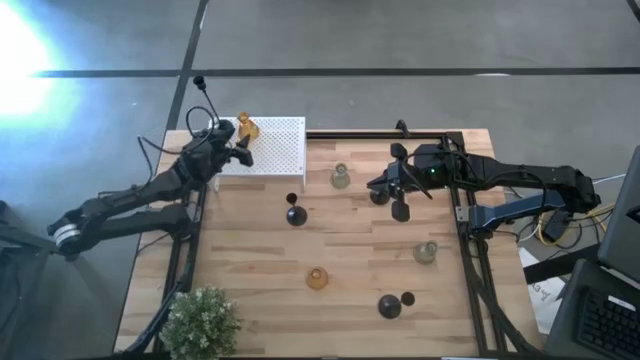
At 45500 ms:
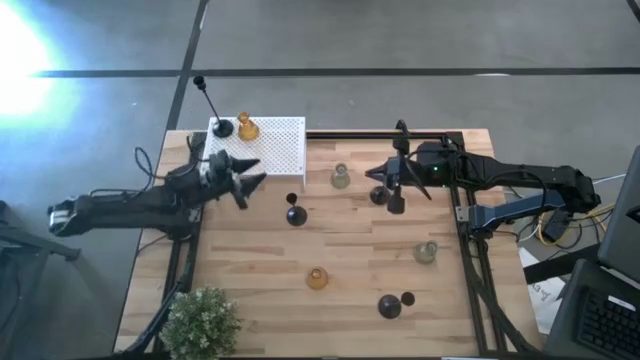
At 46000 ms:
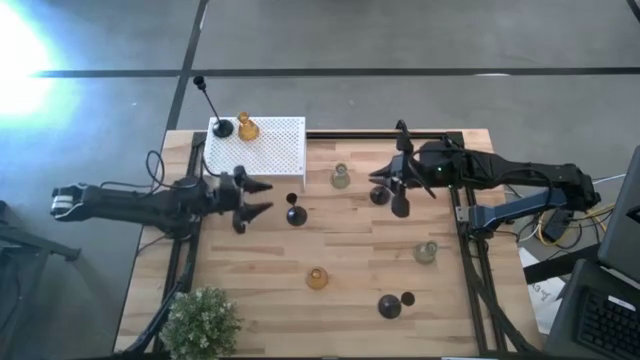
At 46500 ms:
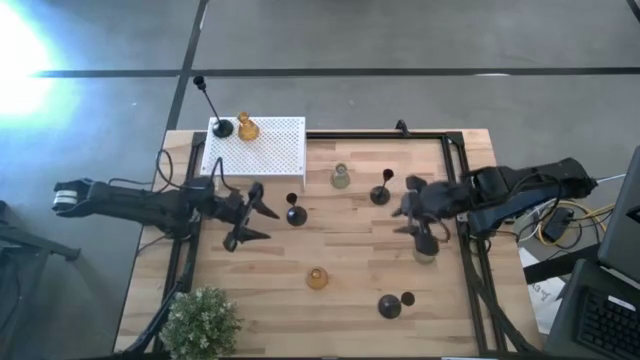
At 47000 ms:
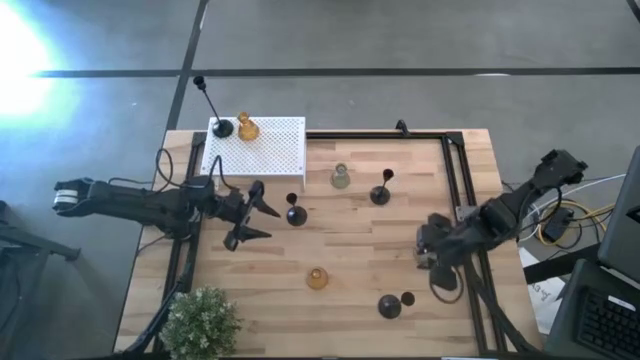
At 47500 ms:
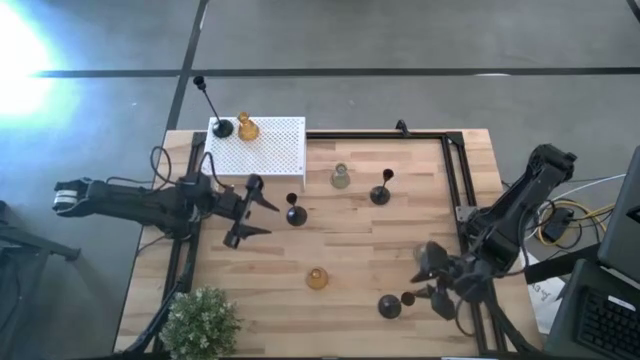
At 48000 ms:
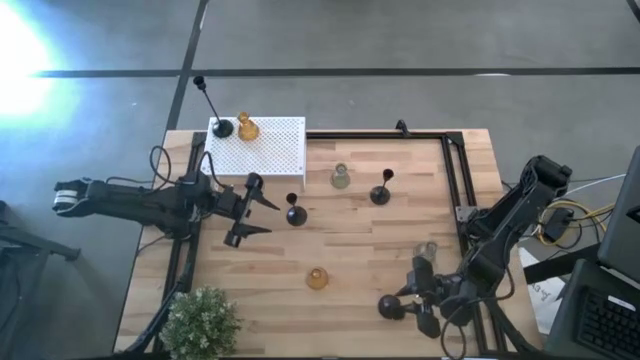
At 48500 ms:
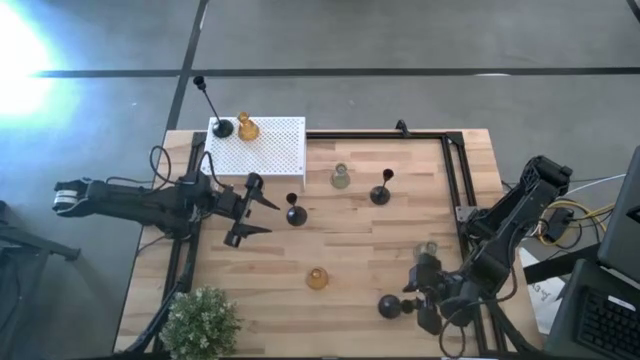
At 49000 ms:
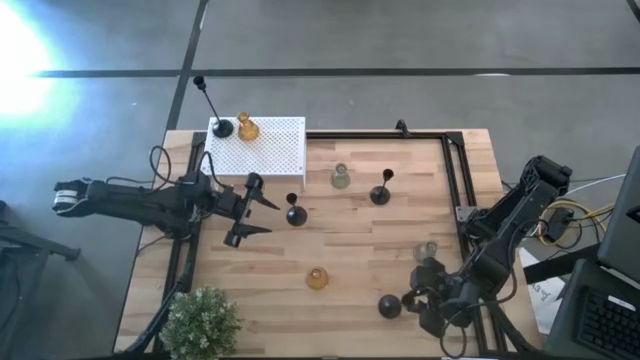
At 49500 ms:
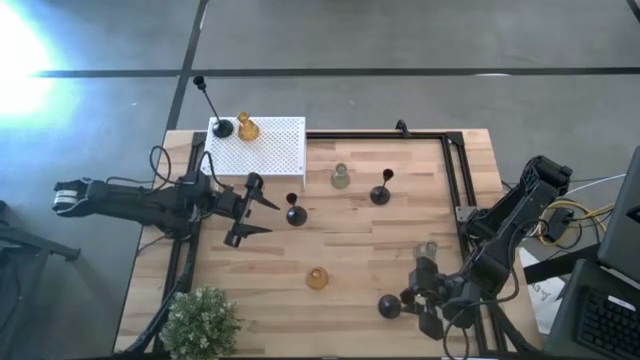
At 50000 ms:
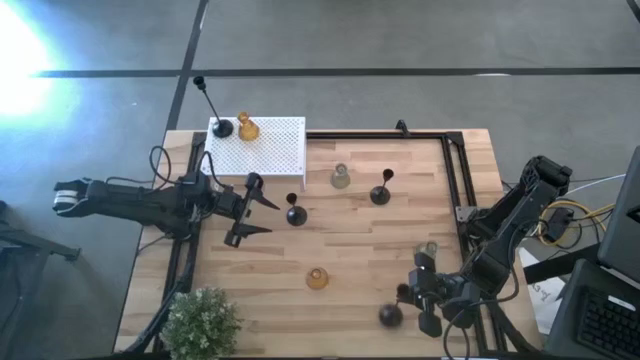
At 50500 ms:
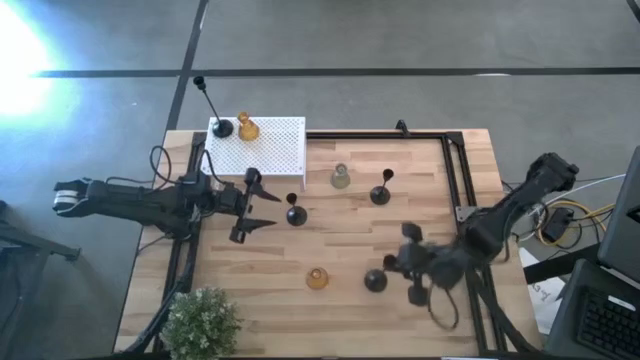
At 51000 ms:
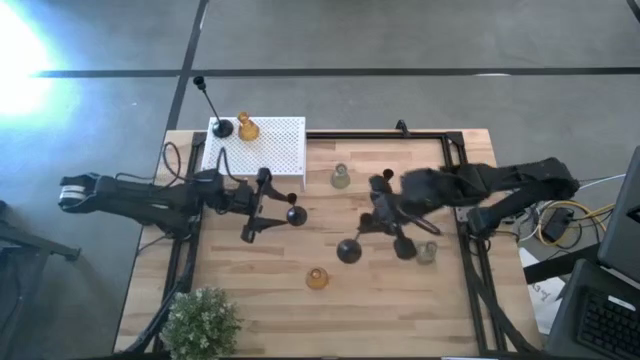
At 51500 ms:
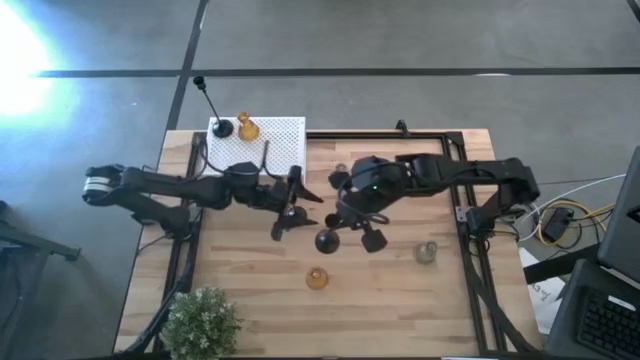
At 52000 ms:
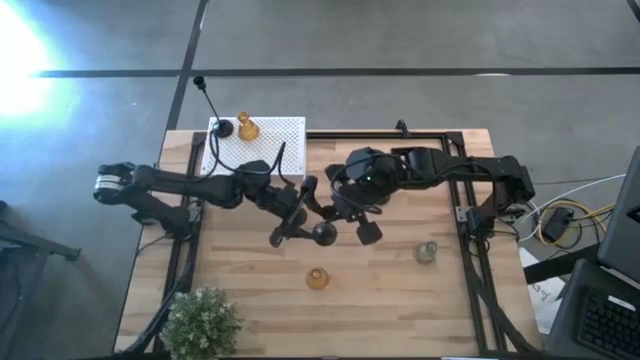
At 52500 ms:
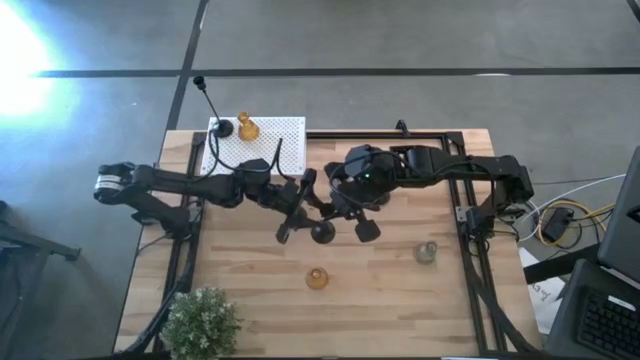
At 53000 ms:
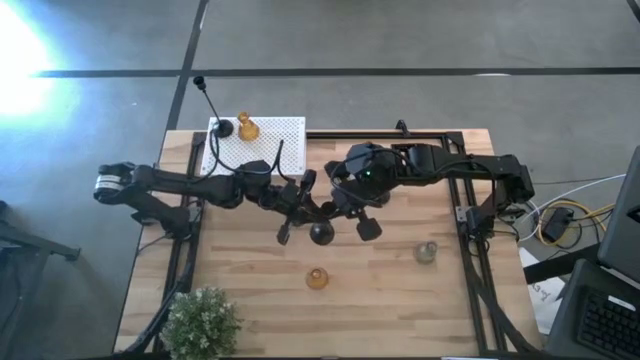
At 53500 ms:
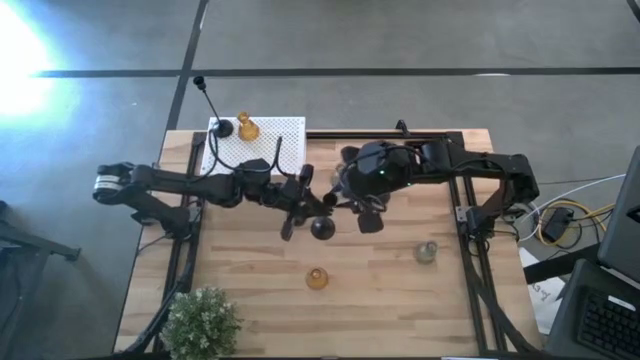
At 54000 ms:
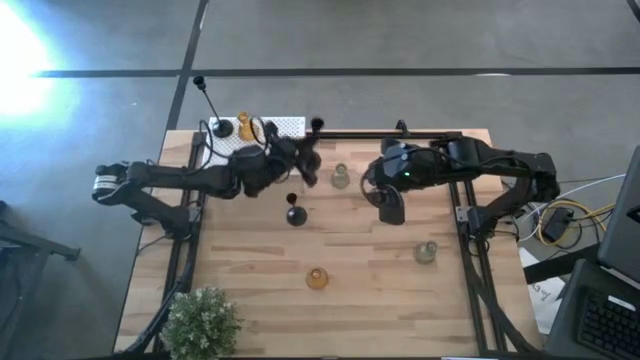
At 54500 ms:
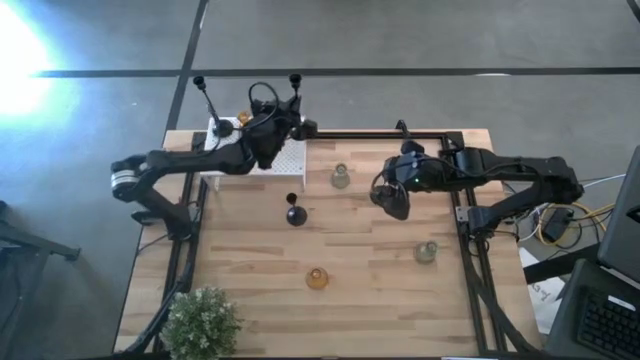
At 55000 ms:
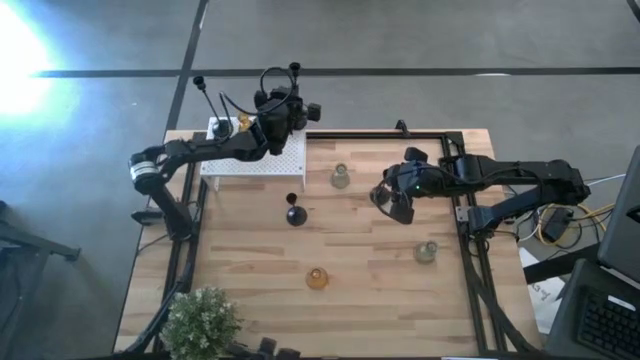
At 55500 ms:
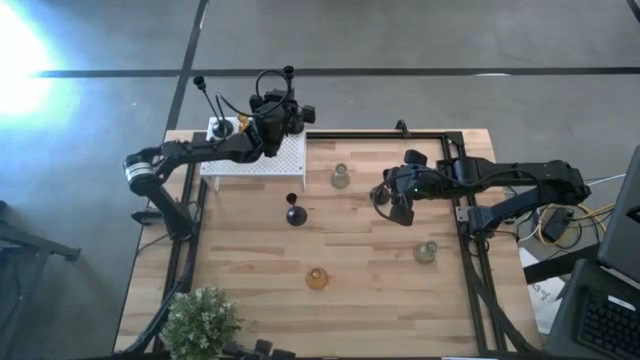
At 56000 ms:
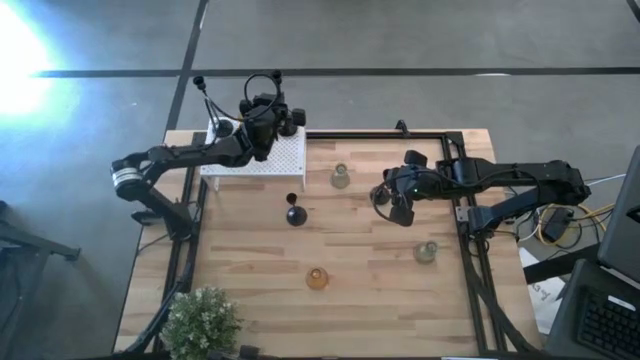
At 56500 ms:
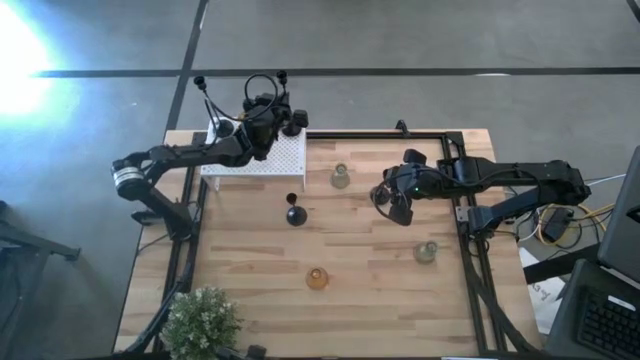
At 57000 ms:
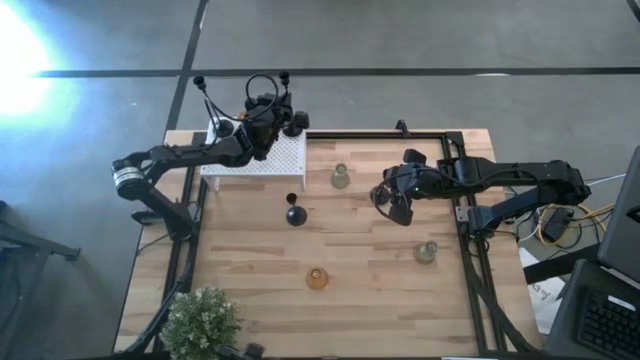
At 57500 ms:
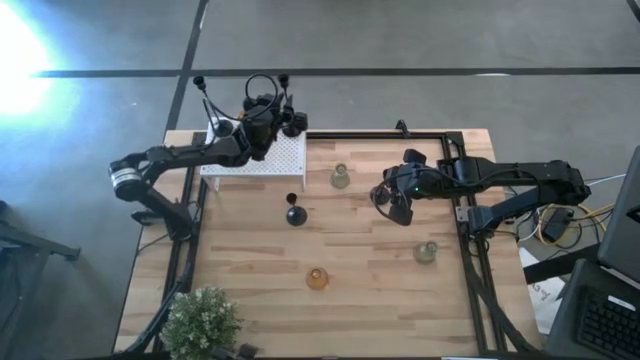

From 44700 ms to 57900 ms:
Task: Pick & Place candle stick holders
Put the large black candle holder on the shelf

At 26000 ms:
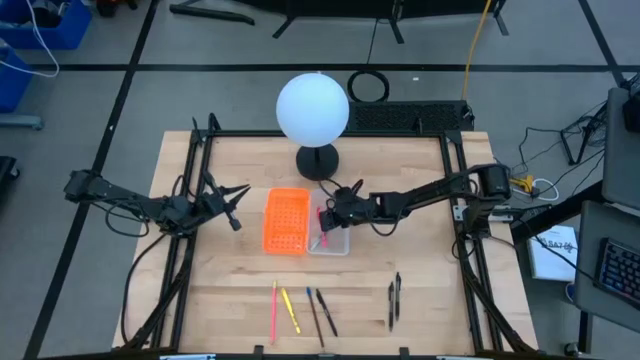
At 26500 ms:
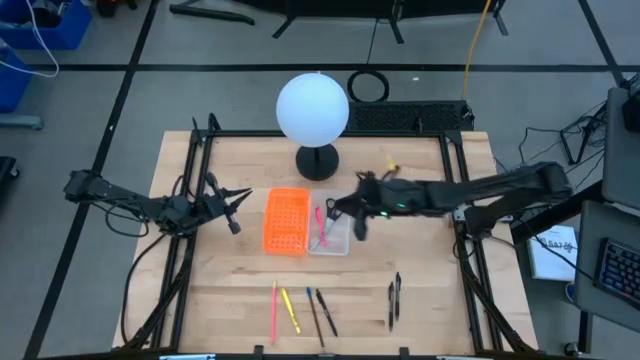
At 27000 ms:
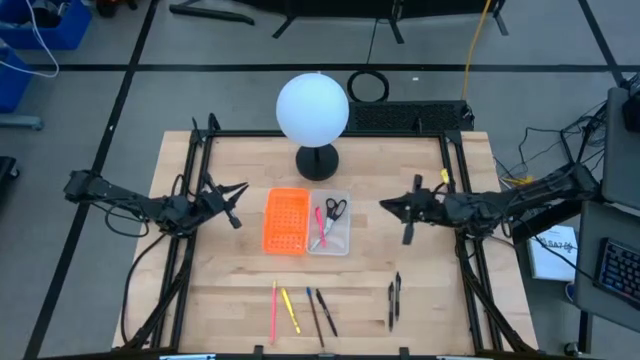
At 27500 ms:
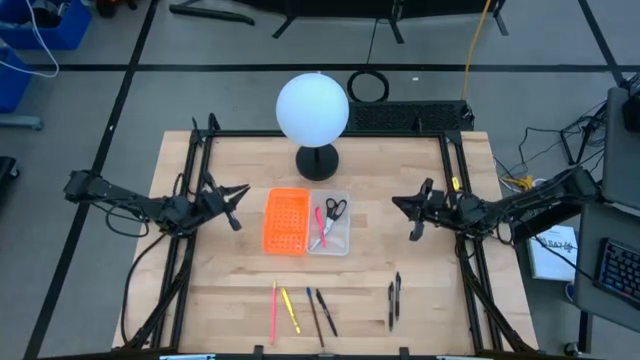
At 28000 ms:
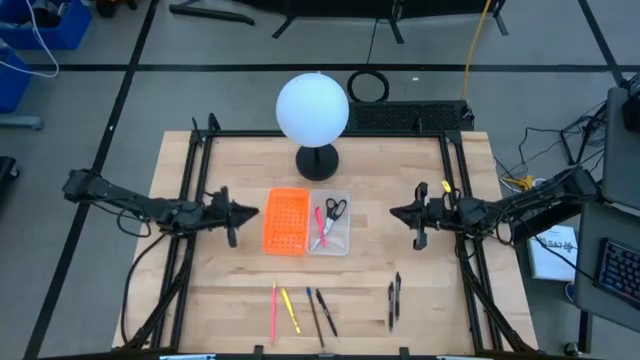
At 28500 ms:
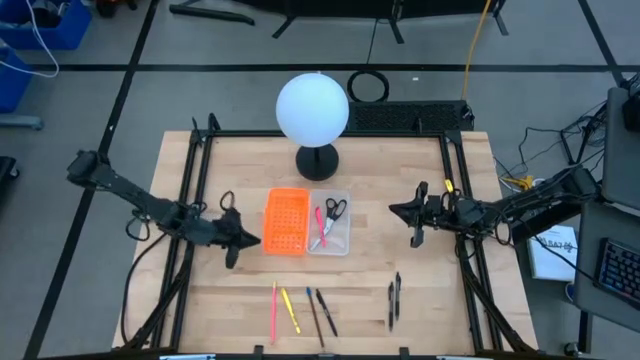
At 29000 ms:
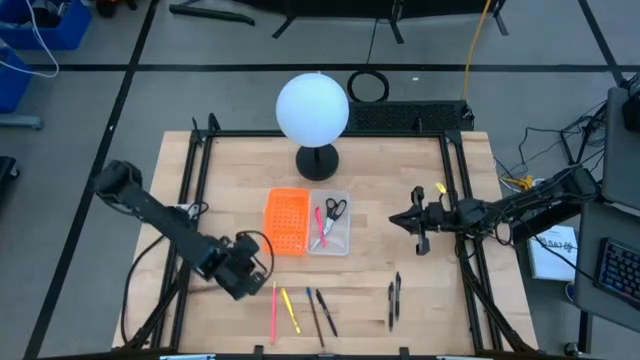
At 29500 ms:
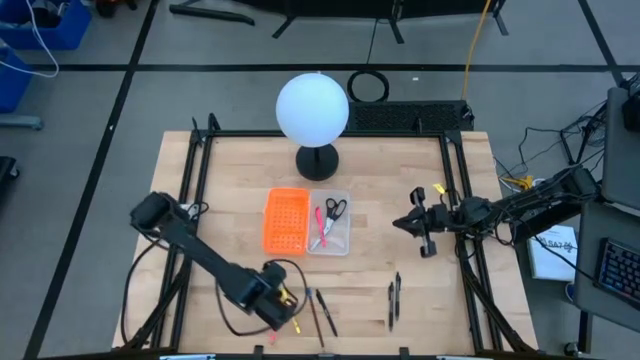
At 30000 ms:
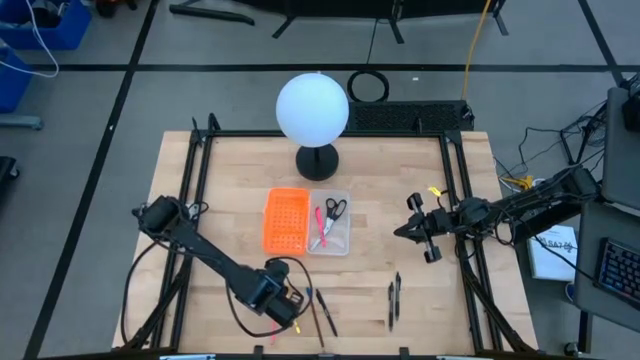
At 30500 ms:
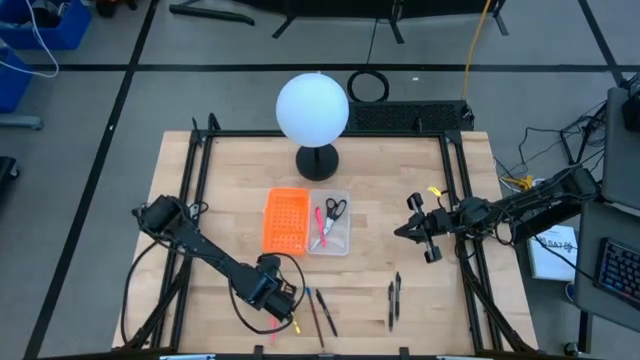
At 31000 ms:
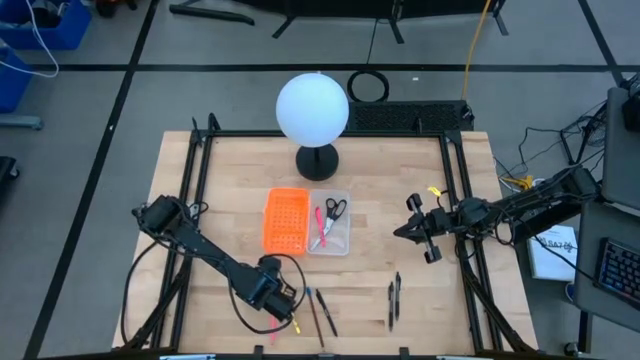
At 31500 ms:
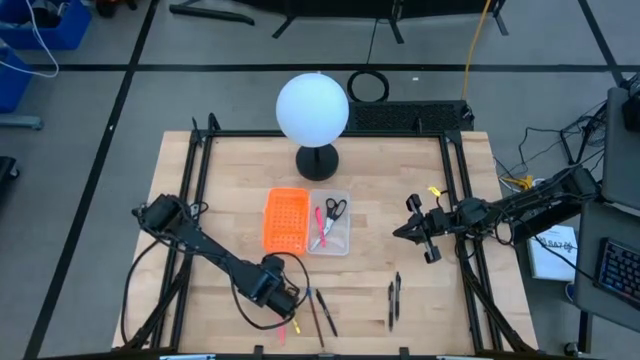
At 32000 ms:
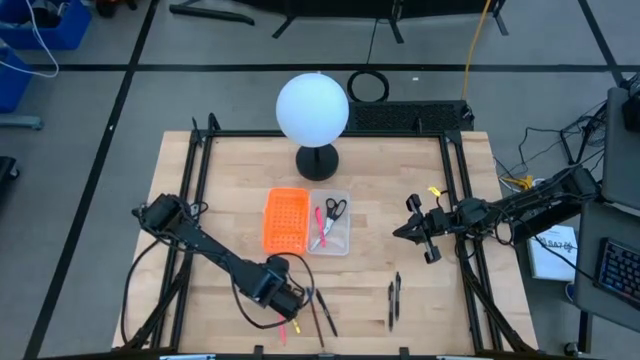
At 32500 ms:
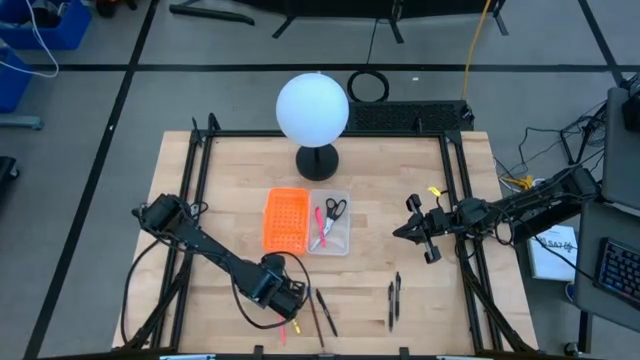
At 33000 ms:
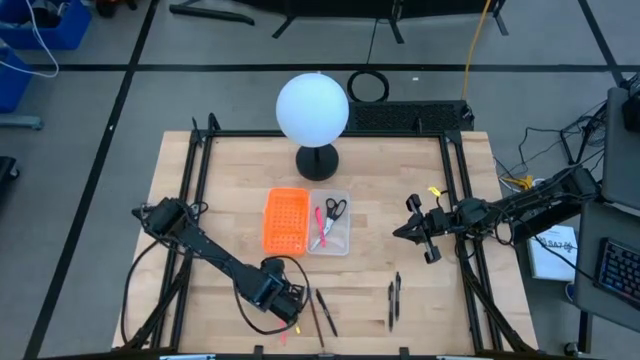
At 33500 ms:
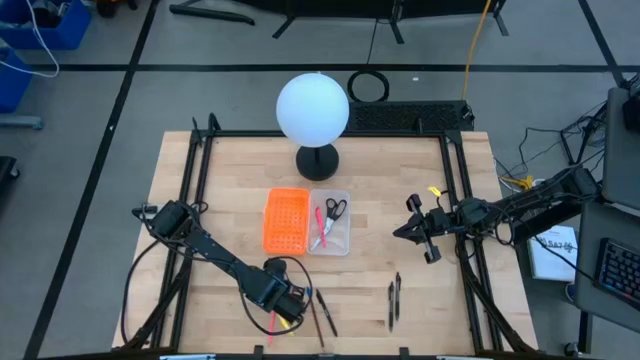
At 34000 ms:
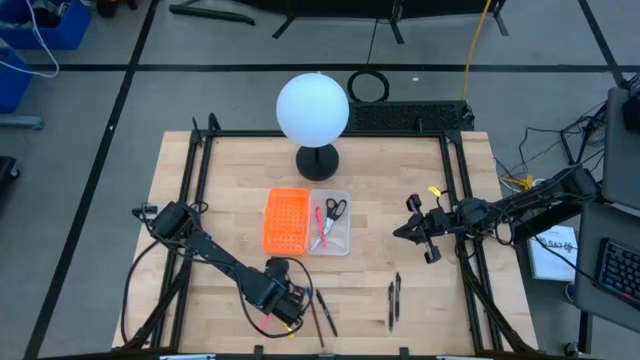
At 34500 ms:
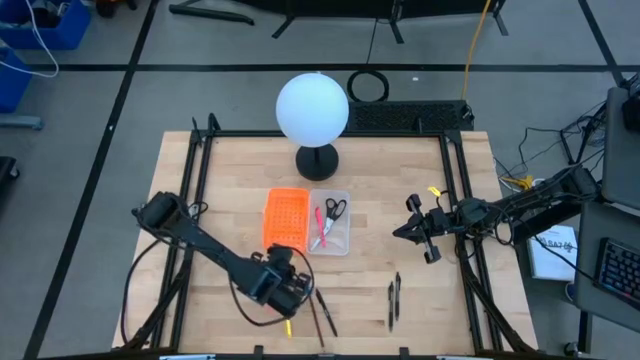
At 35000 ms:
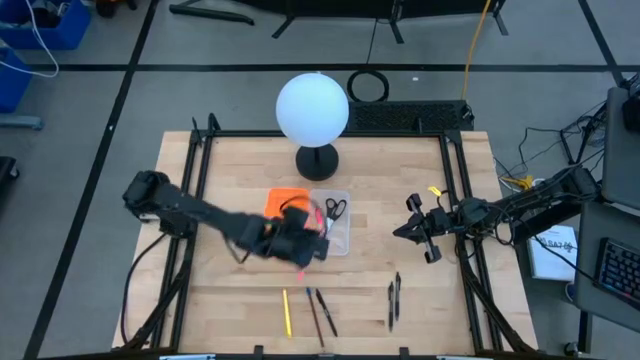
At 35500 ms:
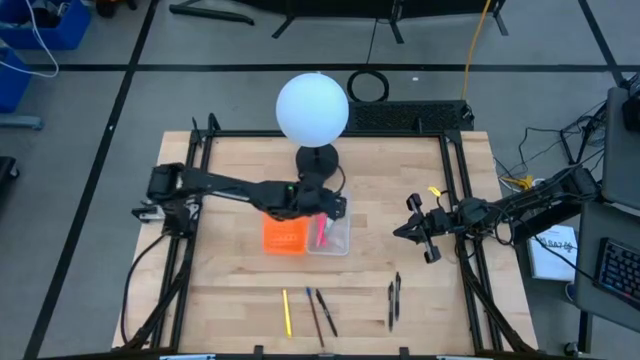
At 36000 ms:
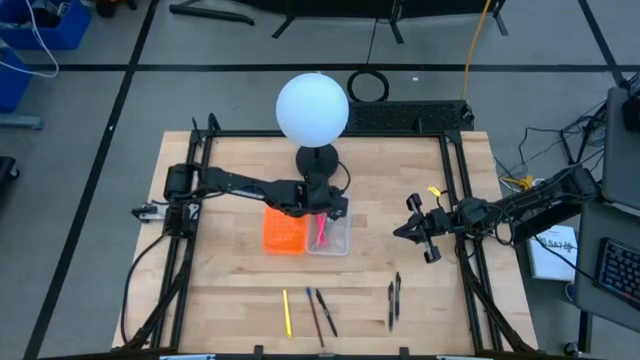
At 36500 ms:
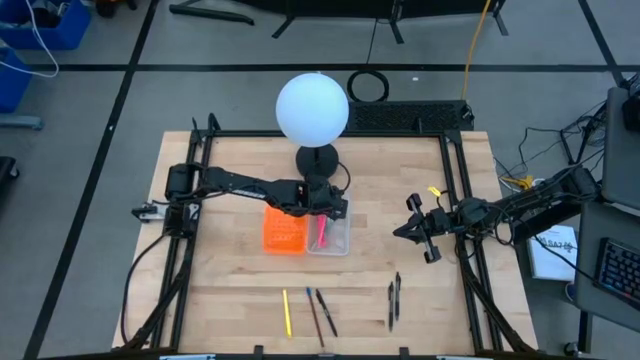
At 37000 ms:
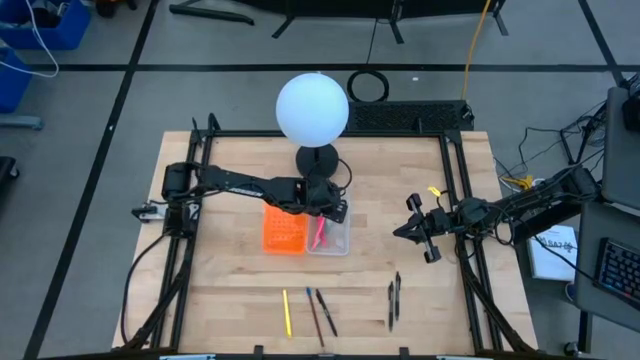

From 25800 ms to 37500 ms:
Task: Pick & place school supplies into a supply box
Put the pink pencil into the orange supply box
